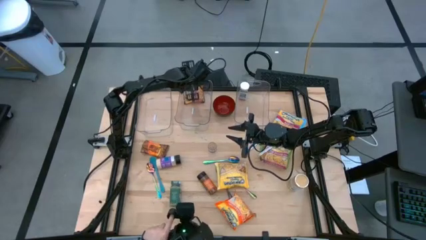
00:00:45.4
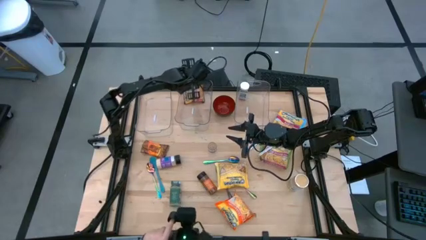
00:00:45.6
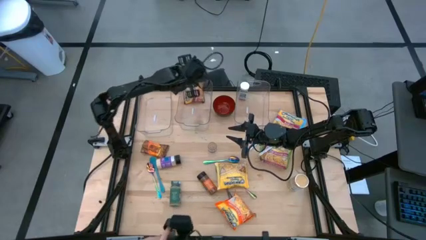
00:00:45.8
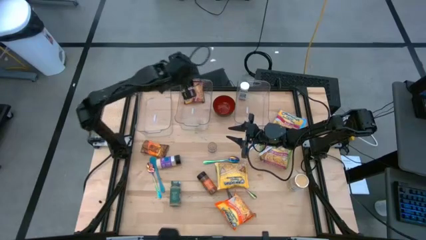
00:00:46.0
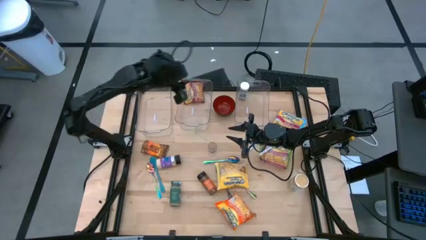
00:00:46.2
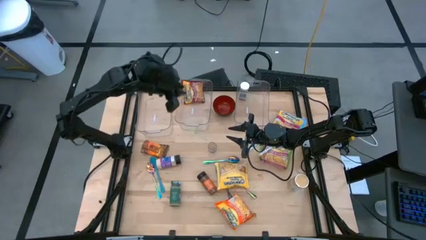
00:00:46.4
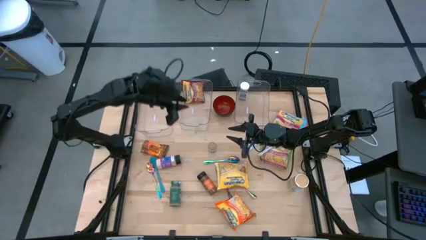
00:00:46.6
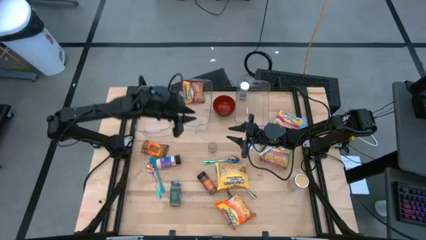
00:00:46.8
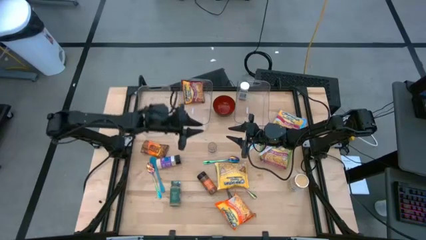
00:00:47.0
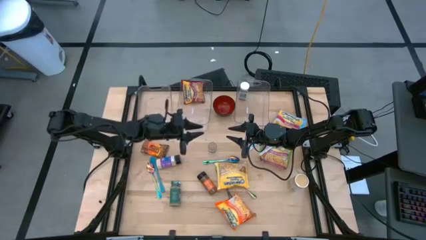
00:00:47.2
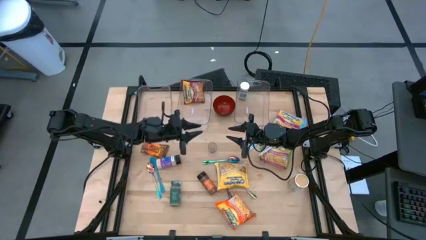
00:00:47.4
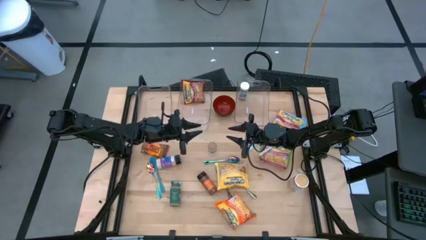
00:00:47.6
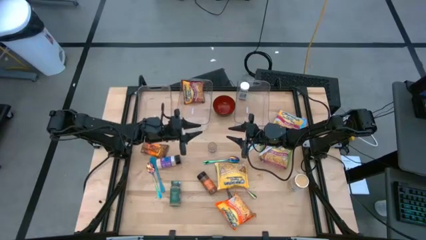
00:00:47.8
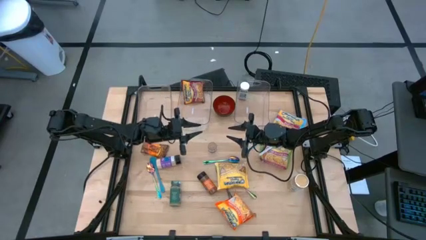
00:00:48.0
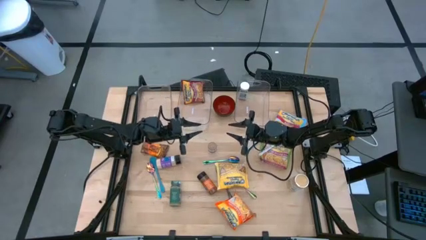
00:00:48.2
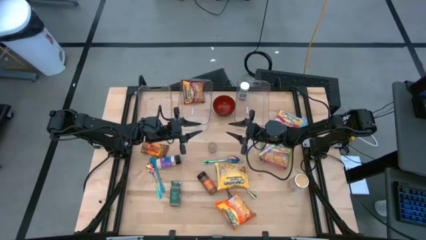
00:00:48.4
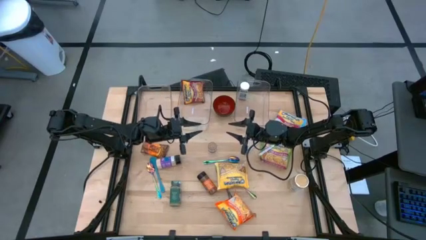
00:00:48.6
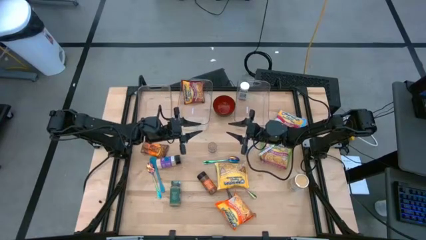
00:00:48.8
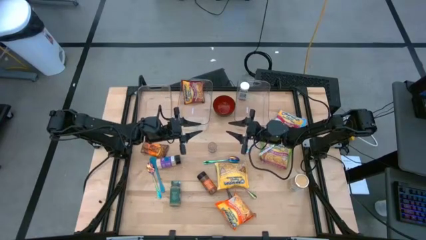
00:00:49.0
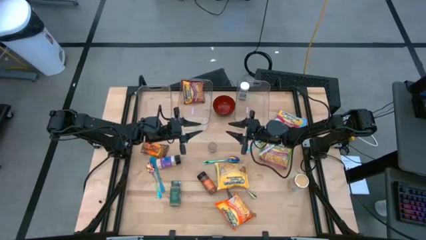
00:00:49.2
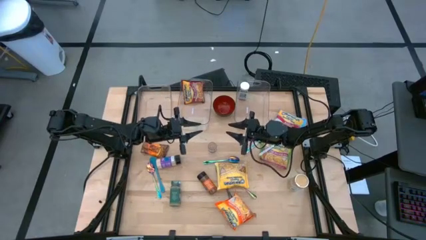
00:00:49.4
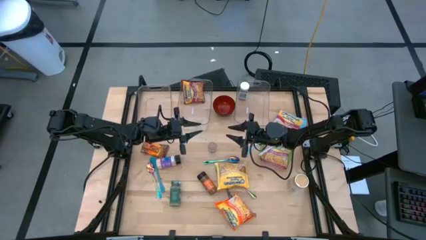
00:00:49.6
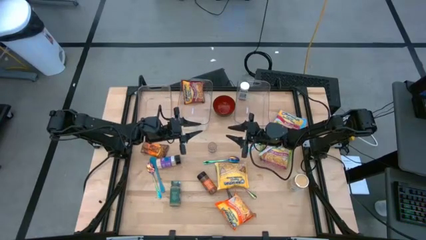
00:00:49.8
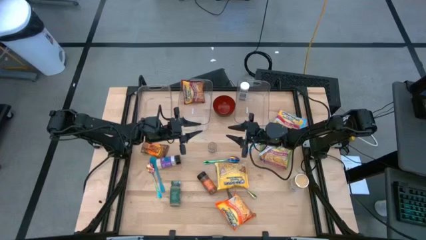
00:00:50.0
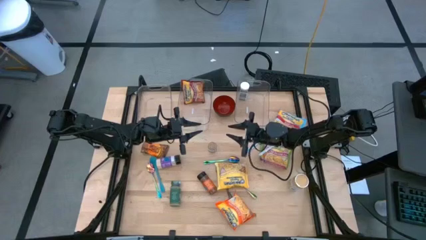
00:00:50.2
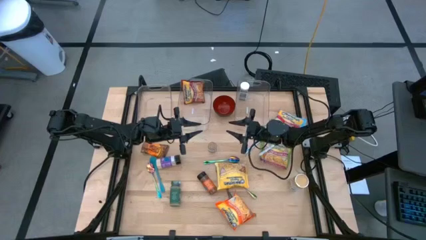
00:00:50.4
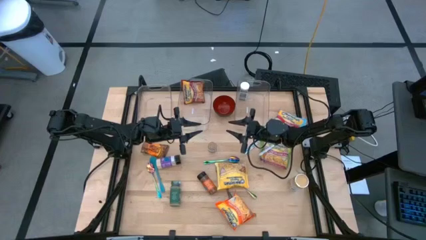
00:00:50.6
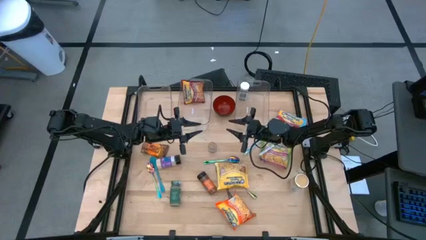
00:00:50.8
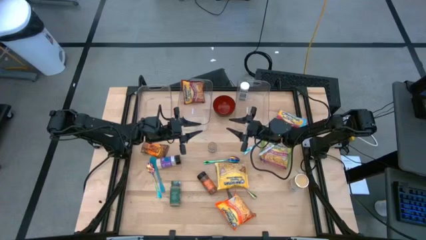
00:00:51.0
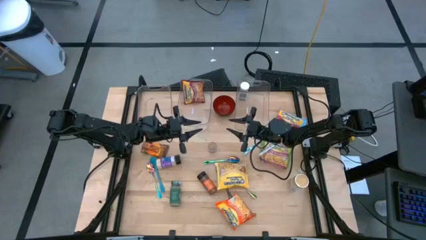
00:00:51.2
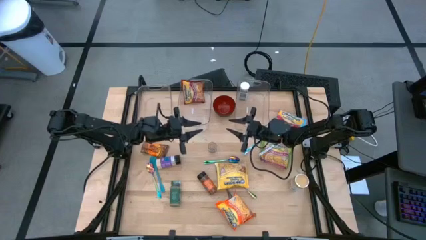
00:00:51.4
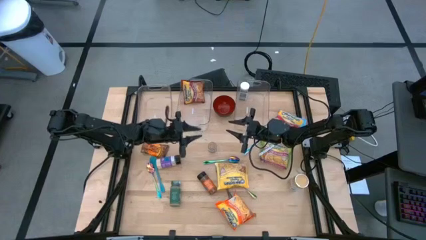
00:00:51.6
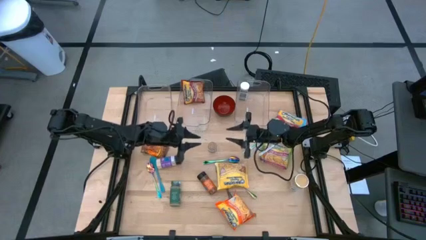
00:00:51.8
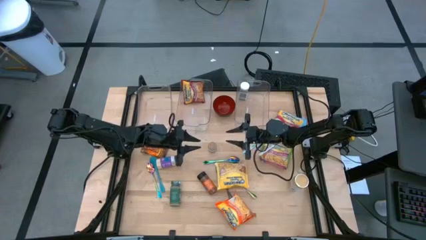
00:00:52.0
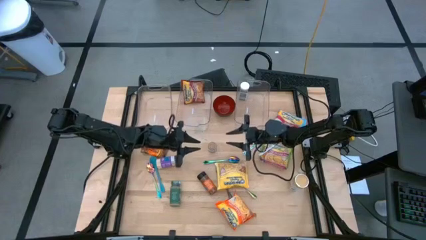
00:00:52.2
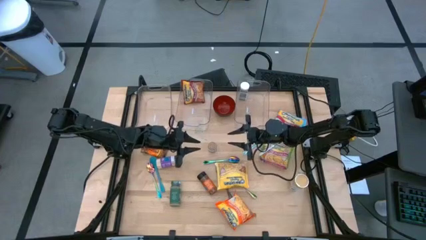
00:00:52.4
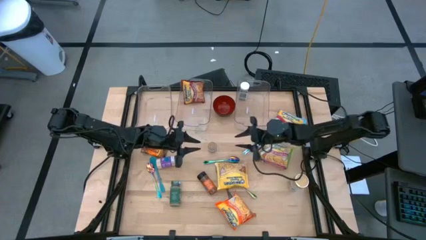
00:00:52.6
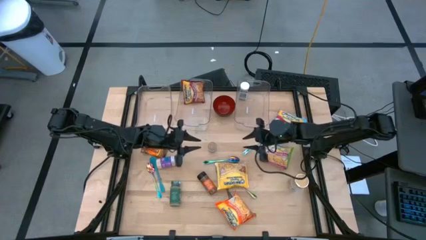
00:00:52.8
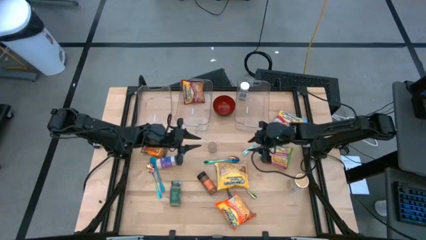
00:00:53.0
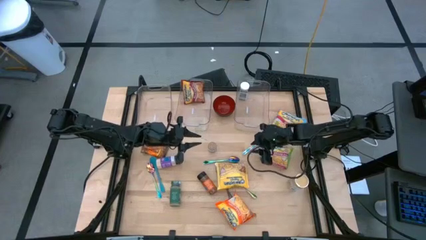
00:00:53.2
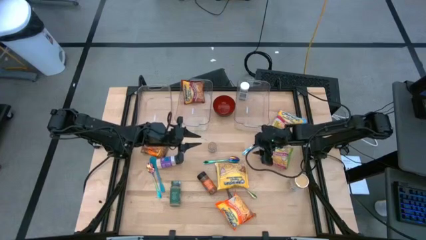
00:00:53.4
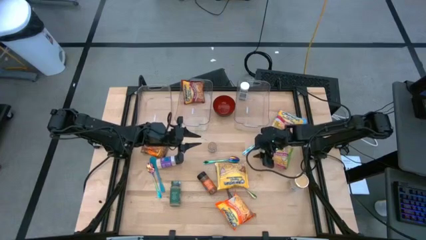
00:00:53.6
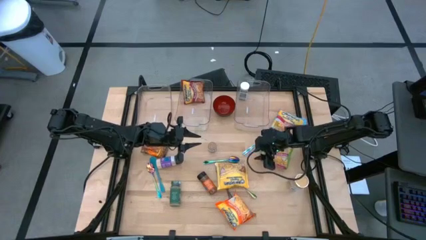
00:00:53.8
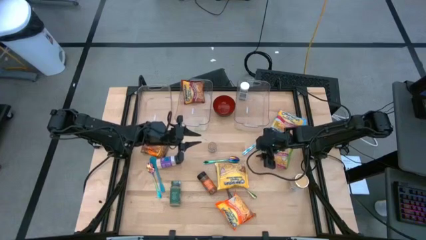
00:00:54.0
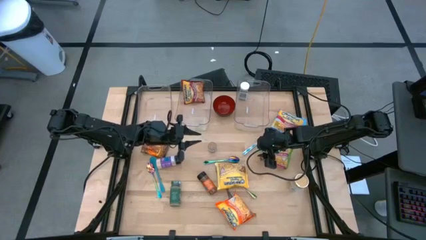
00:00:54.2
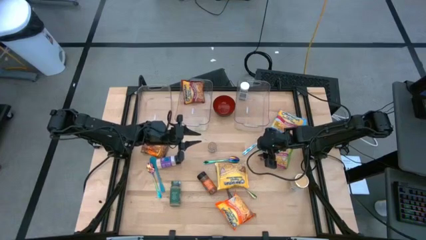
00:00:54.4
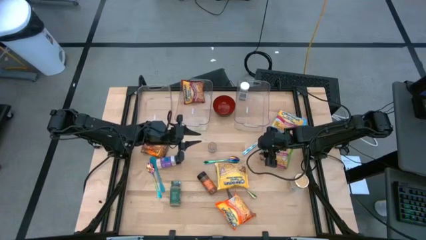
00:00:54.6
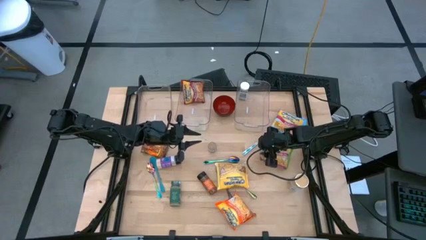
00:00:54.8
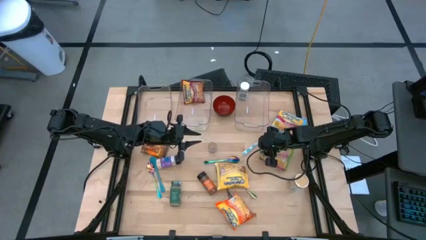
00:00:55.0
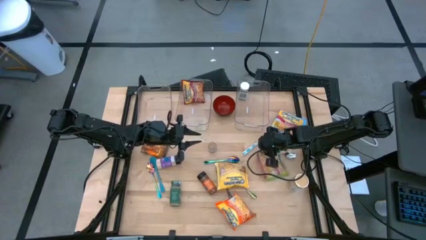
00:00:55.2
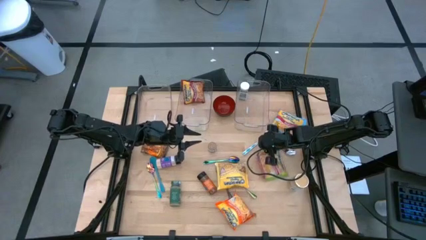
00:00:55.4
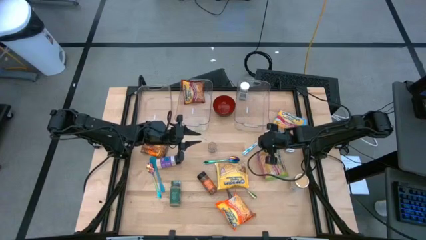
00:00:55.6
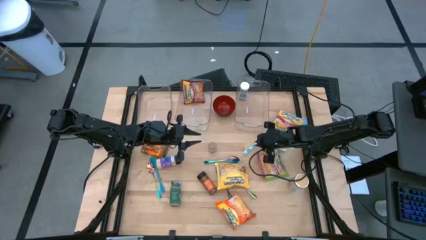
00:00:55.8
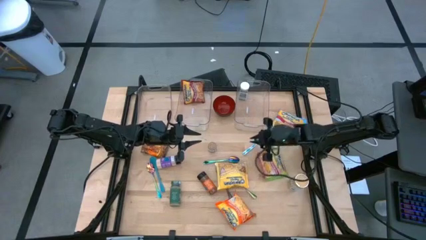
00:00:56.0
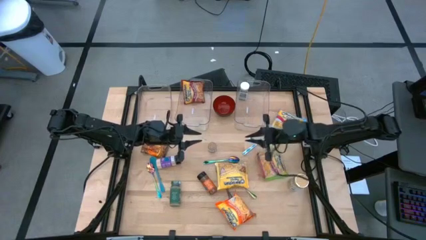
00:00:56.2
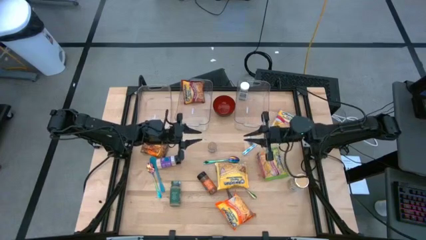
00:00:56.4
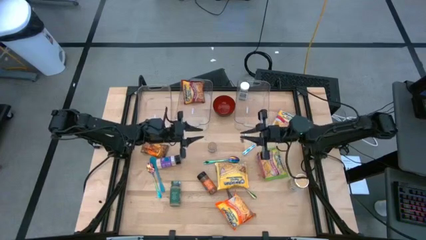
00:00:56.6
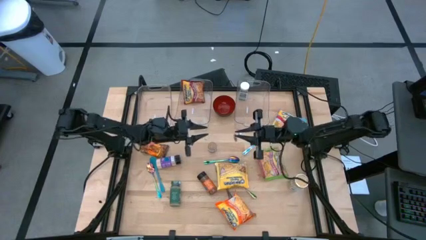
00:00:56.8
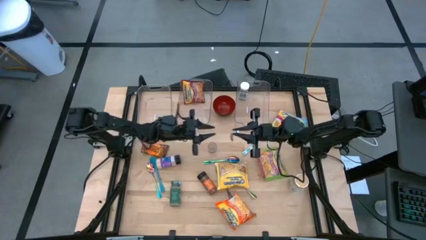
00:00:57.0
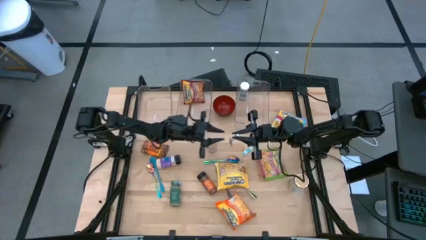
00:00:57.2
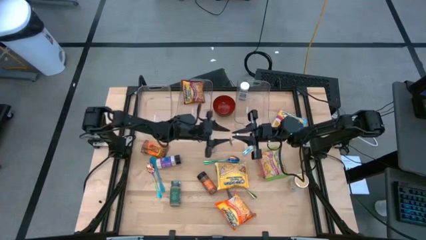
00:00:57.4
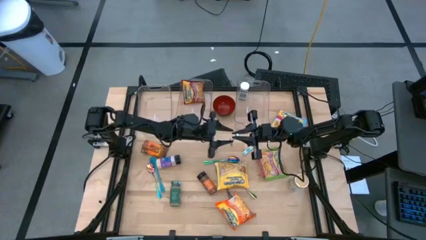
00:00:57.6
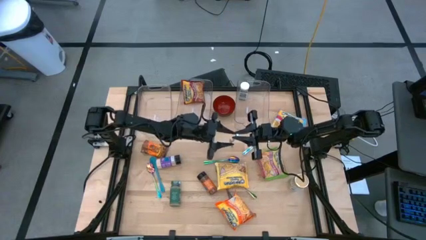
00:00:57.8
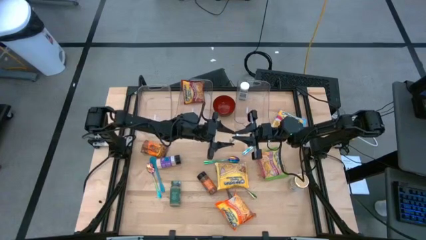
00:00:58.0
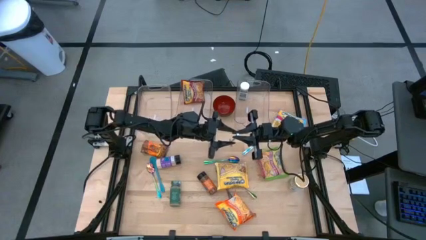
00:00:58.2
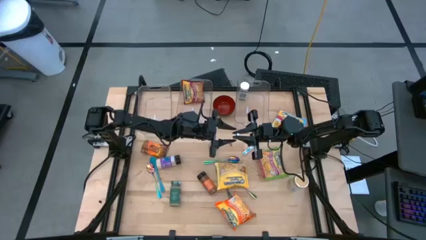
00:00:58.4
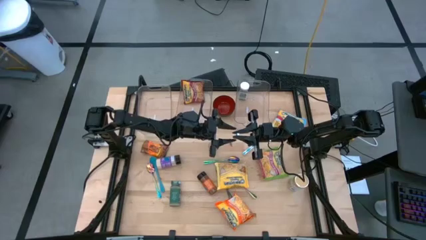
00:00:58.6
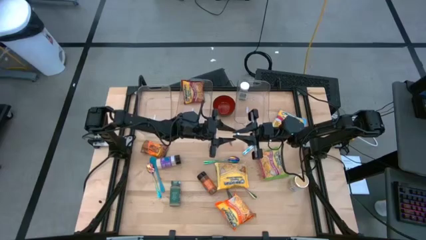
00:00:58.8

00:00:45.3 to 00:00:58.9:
Task: Pick & Place Food Item
Put the white spoon into the left transparent bin
